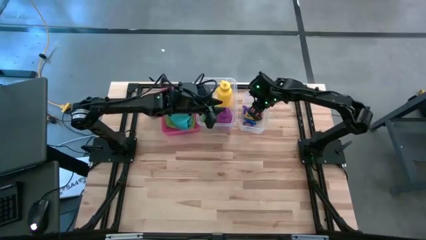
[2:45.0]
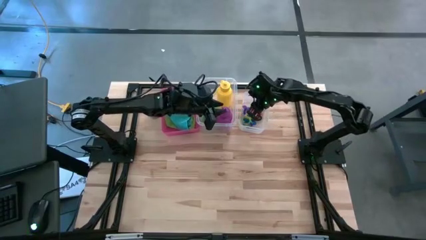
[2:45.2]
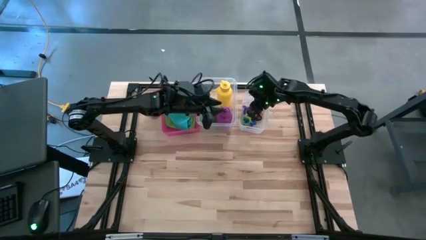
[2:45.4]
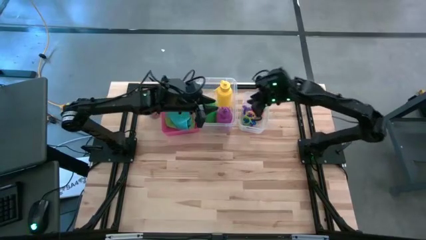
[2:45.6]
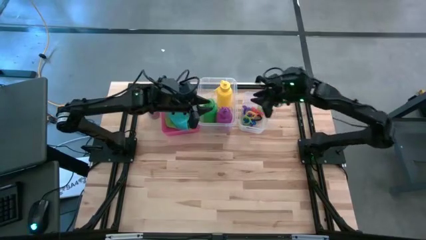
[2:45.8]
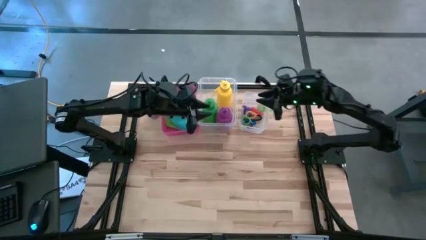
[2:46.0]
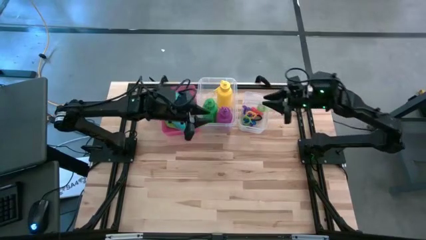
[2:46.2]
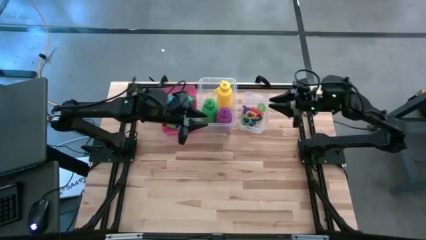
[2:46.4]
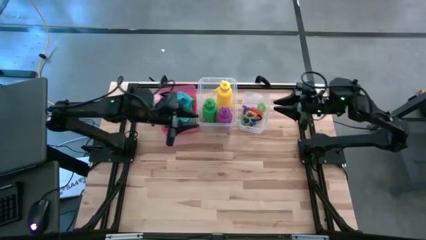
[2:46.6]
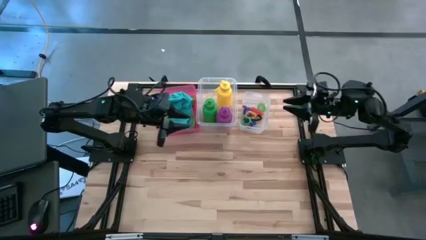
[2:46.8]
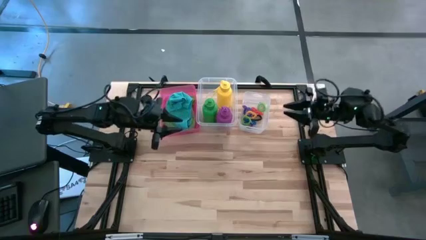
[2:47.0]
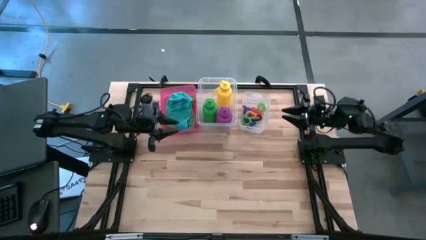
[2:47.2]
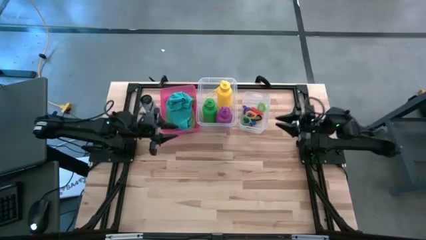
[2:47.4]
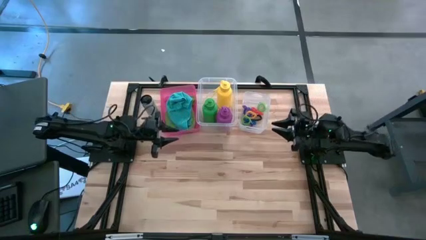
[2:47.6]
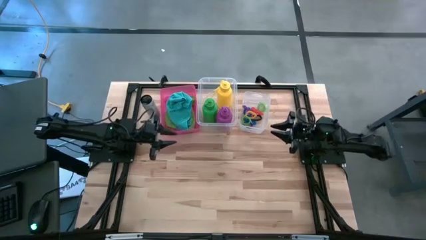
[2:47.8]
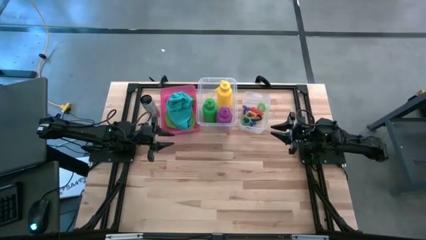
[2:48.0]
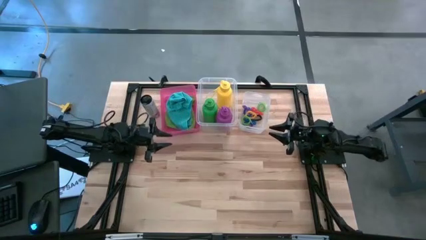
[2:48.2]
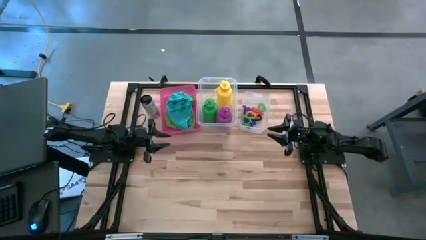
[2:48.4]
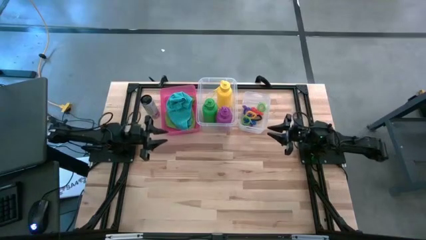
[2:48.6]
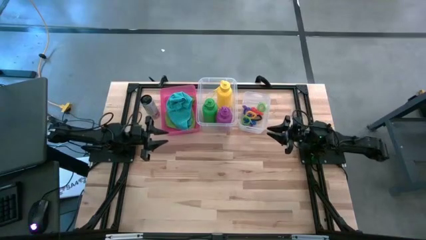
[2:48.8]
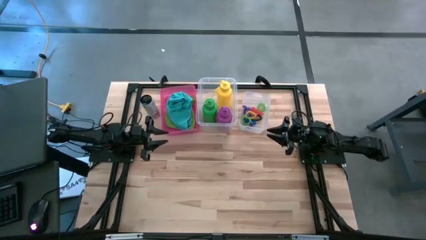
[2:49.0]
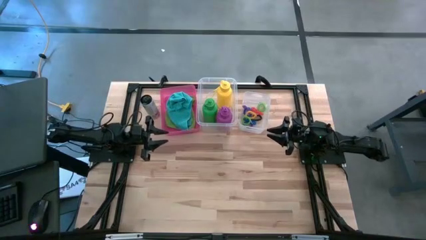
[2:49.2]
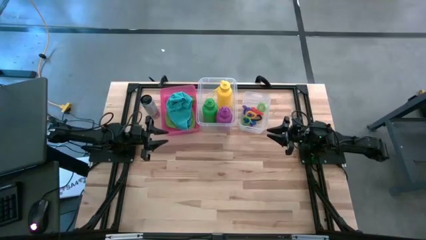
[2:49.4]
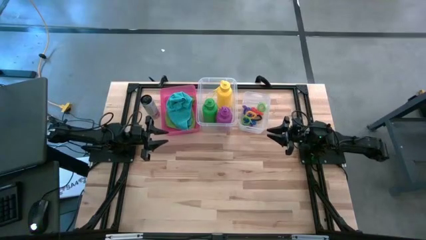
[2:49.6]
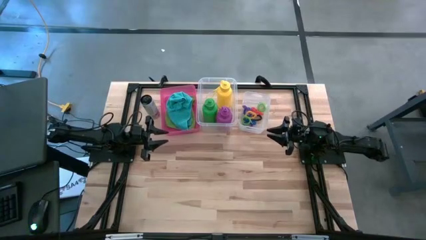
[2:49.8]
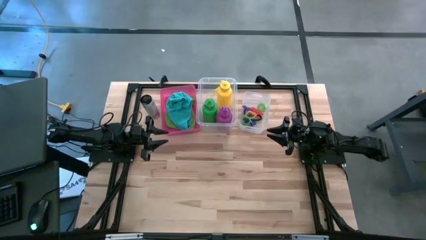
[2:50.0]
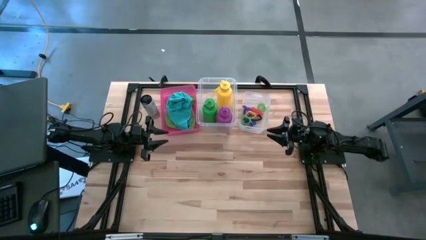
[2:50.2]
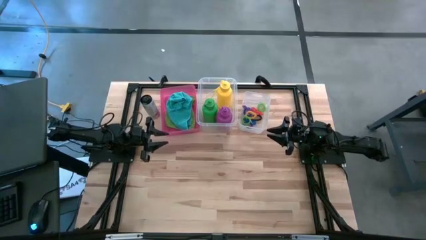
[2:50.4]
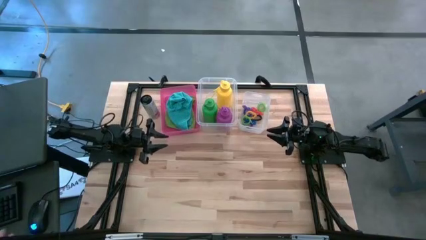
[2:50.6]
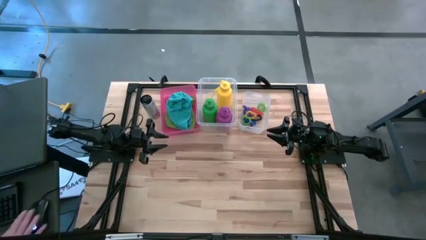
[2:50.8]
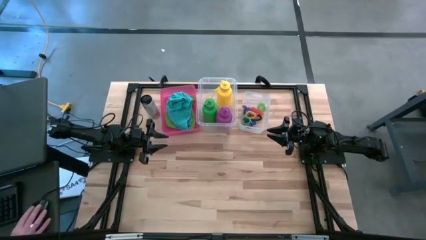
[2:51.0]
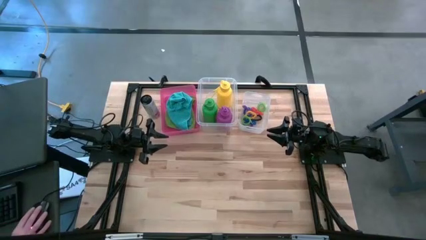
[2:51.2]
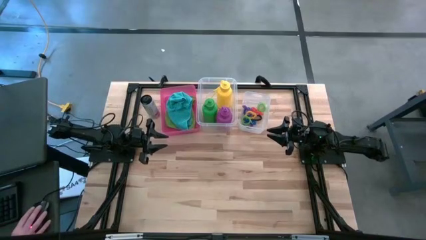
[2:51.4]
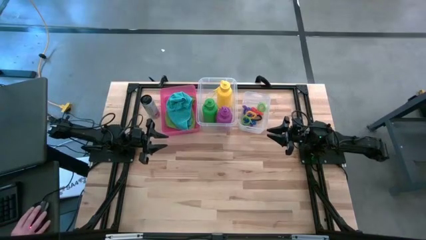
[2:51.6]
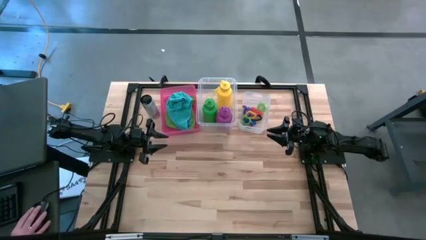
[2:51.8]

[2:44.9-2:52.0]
Task: Pick & Place Sports Items
Return To Home Position

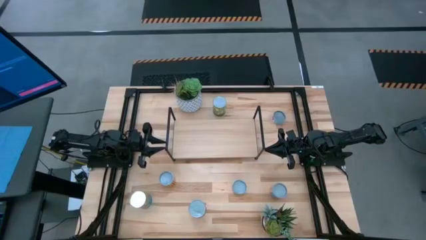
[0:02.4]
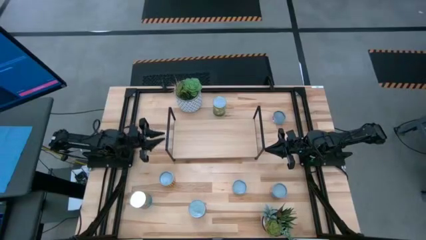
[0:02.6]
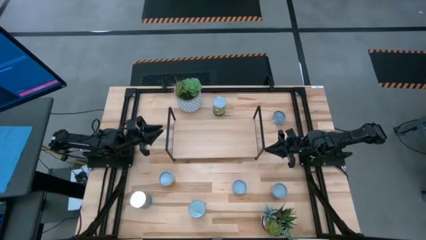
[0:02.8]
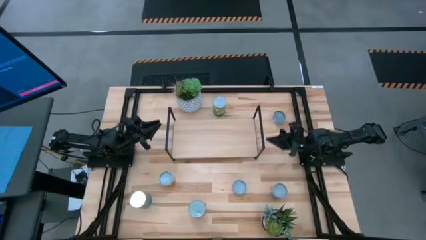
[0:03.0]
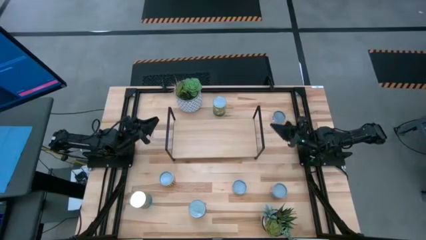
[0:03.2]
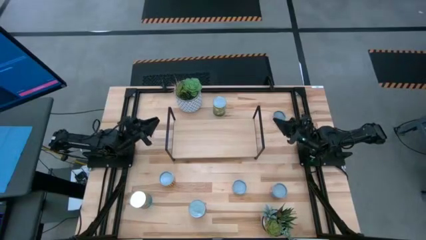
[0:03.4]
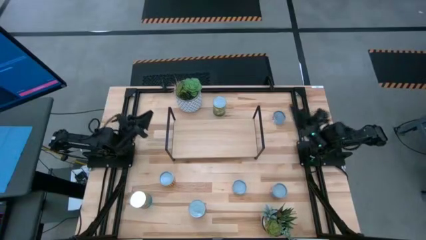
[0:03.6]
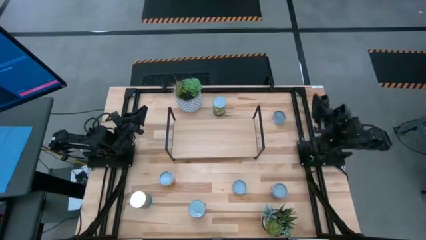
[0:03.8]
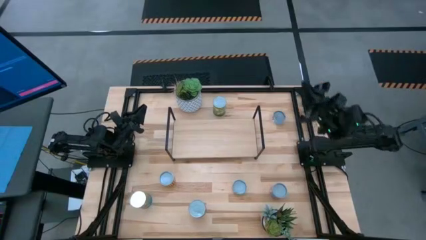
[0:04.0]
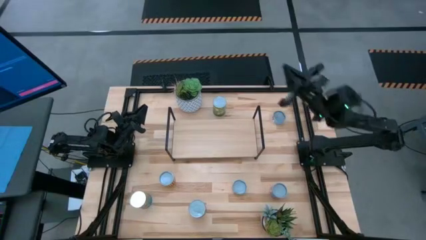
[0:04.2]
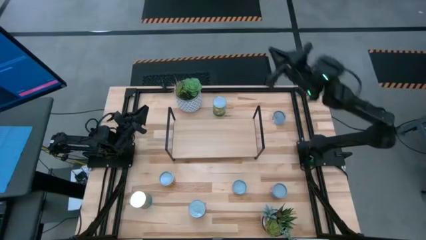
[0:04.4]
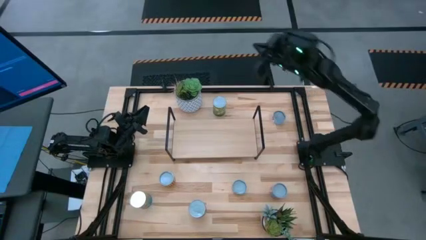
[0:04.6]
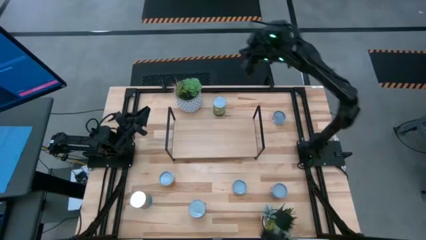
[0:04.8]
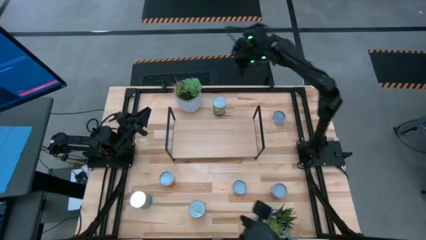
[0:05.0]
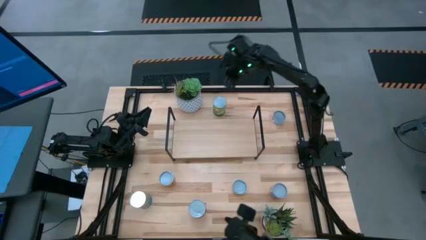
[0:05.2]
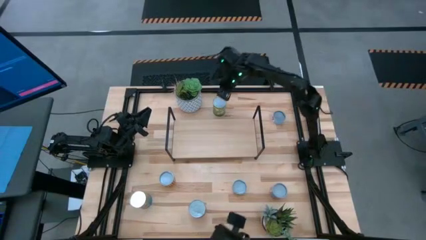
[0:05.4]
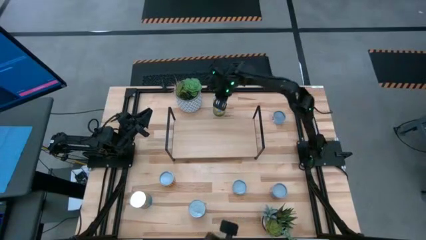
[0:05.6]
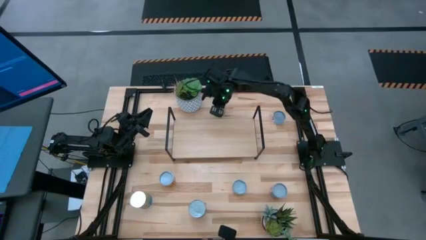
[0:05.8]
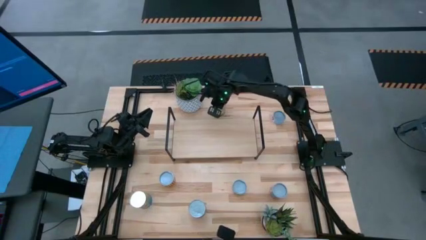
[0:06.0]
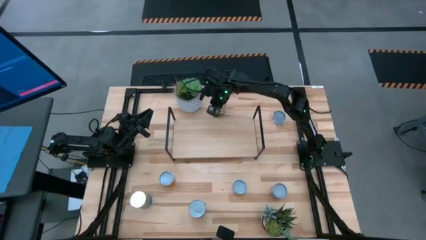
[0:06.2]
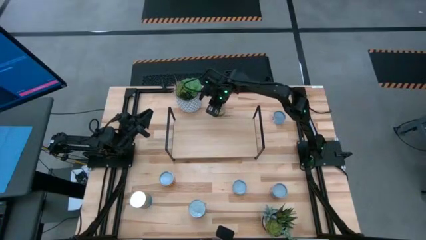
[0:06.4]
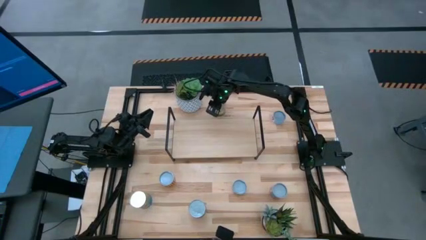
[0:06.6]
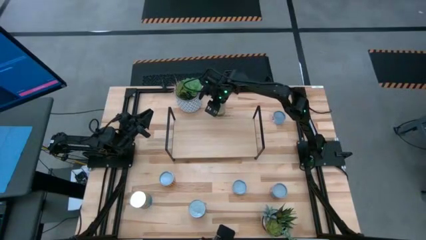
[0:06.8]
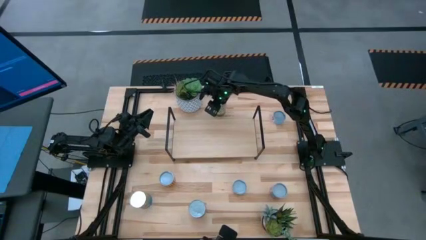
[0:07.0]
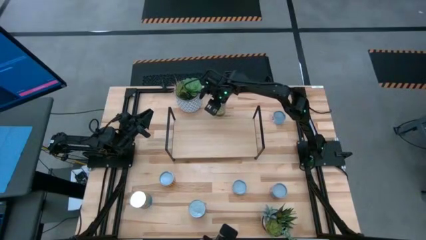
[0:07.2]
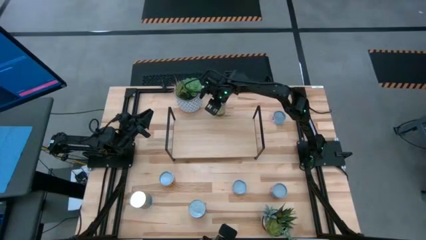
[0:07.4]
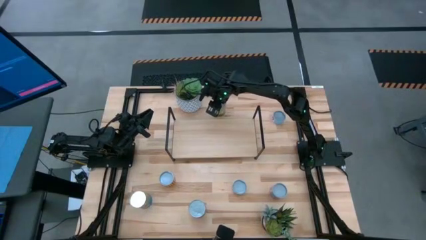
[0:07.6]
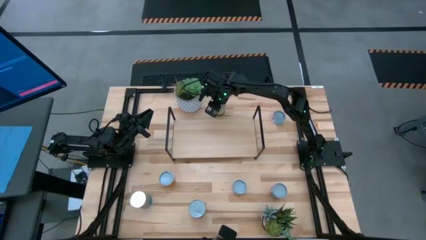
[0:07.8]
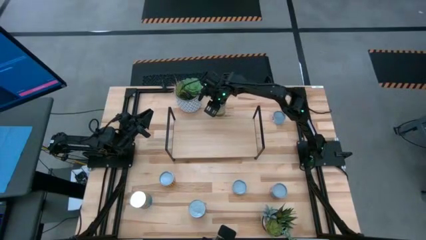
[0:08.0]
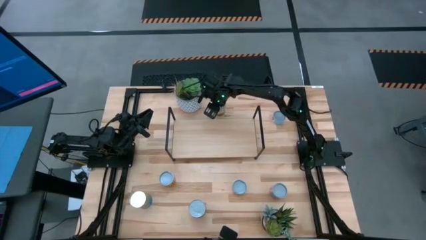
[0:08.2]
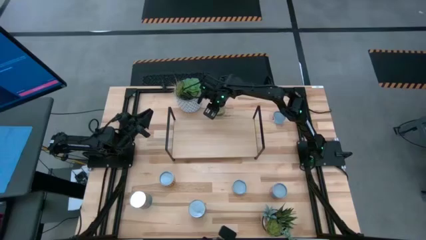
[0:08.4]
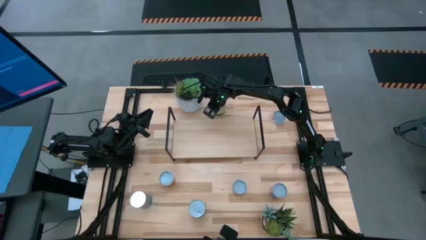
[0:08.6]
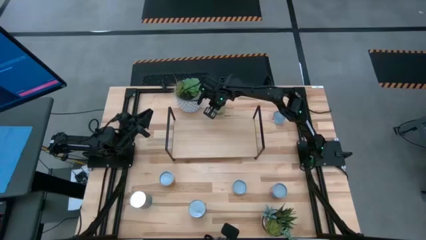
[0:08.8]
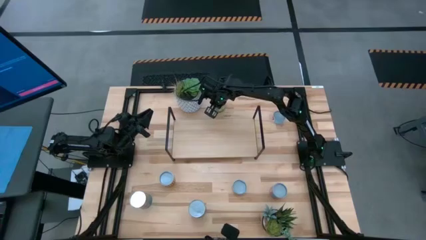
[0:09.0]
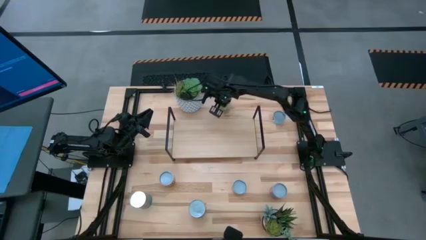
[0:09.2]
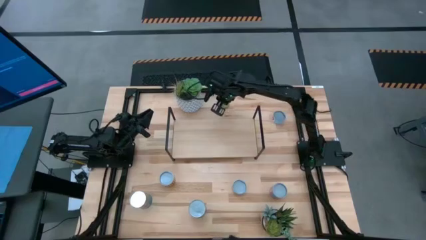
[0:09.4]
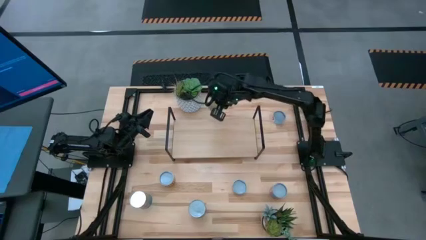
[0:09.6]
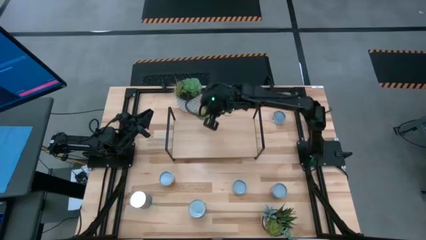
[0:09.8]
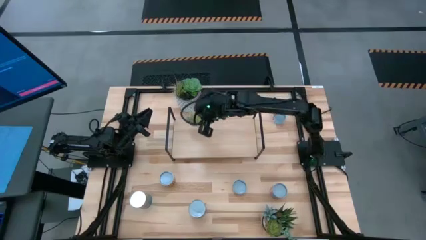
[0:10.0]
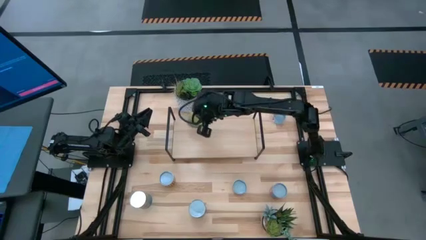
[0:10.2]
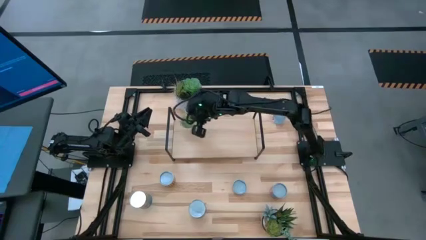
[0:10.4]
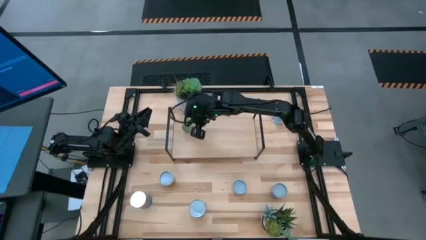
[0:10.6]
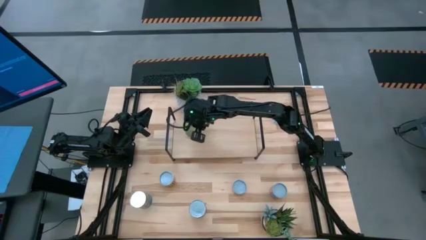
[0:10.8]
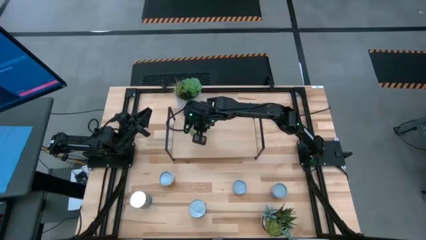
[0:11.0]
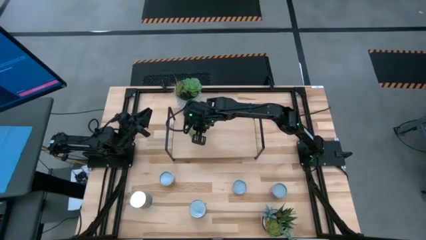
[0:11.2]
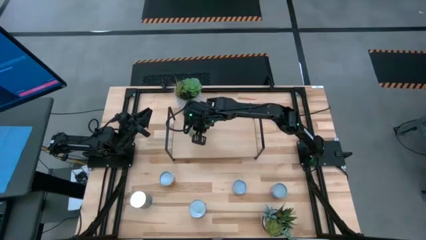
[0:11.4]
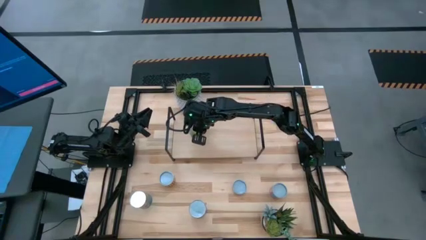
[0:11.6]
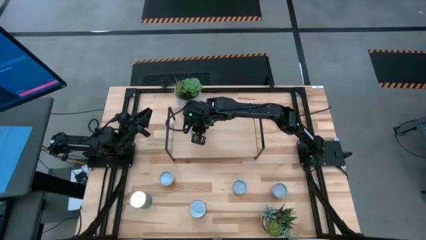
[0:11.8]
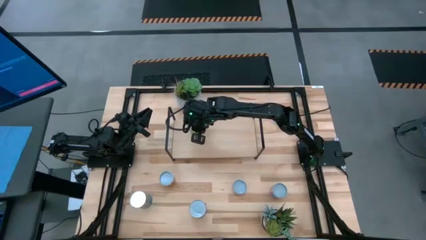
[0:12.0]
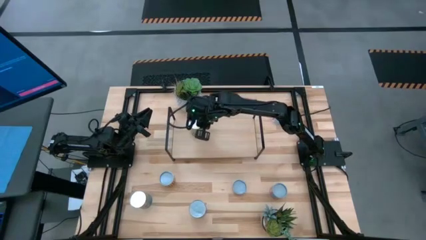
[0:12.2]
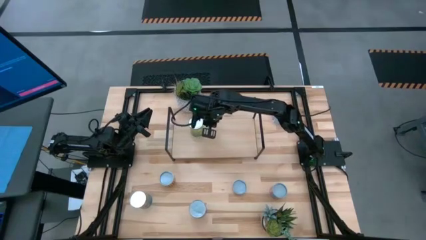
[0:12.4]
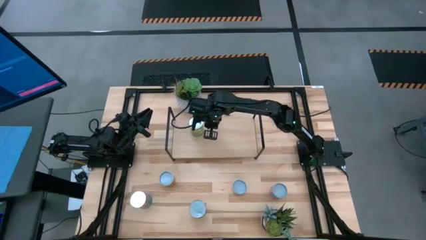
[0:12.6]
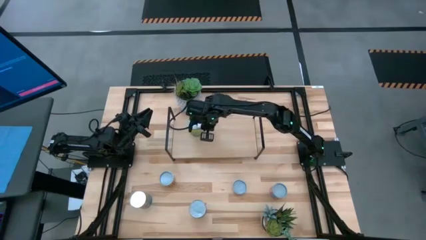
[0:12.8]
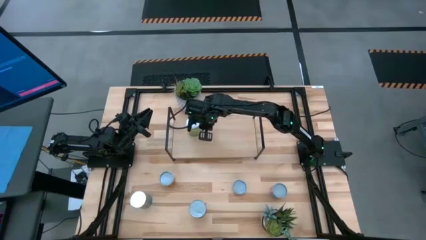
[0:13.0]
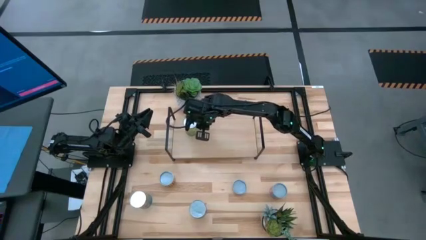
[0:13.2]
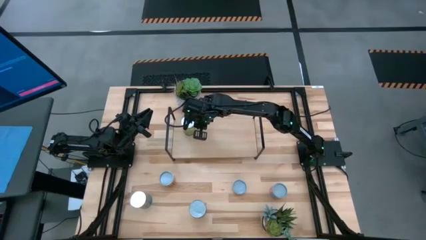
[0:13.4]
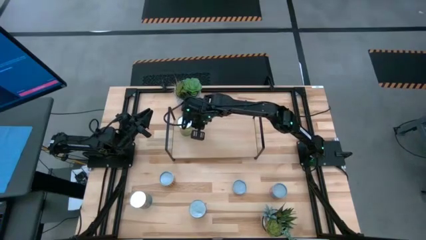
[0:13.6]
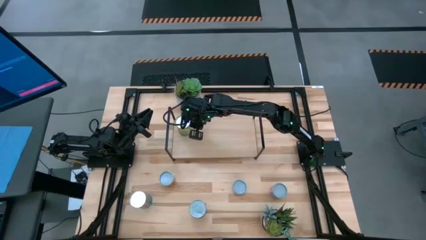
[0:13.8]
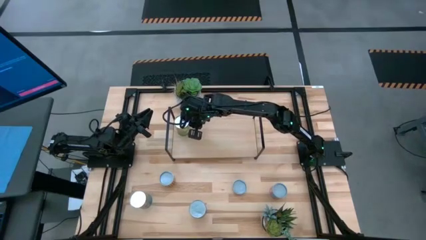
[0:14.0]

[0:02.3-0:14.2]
Task: Pick and place cans onto a shelf
Put the canned pears on the shelf
